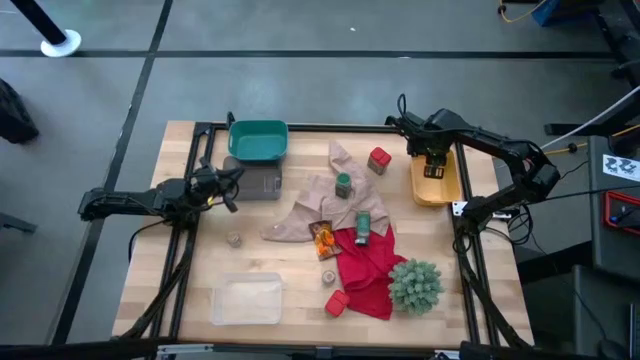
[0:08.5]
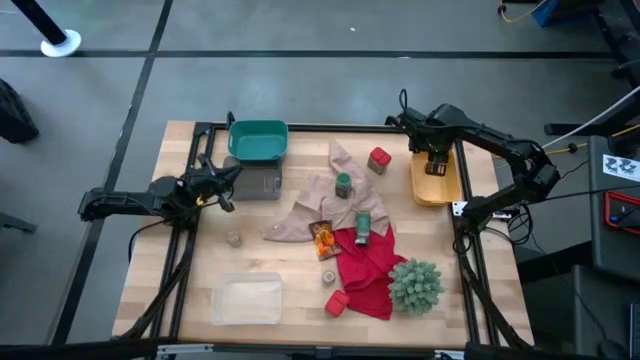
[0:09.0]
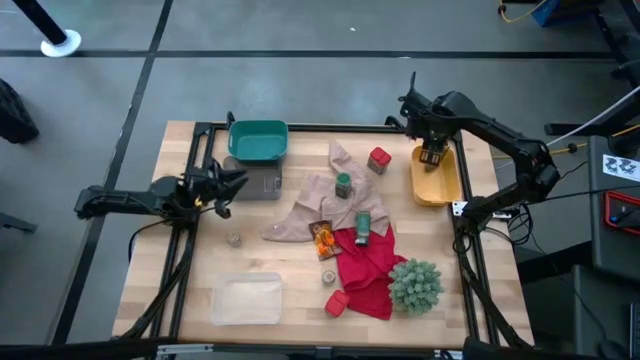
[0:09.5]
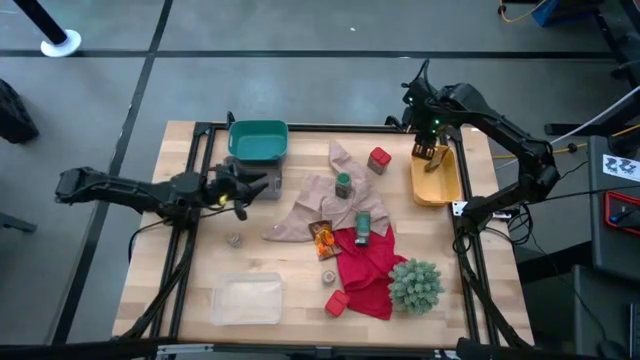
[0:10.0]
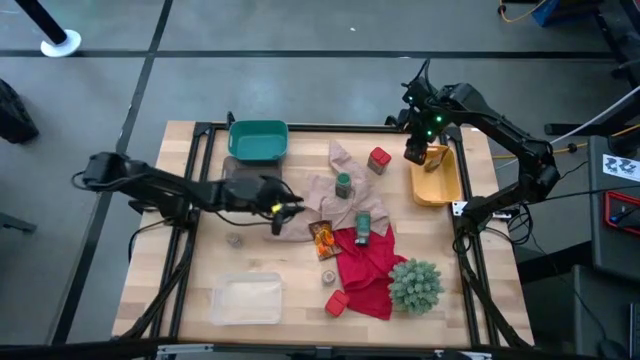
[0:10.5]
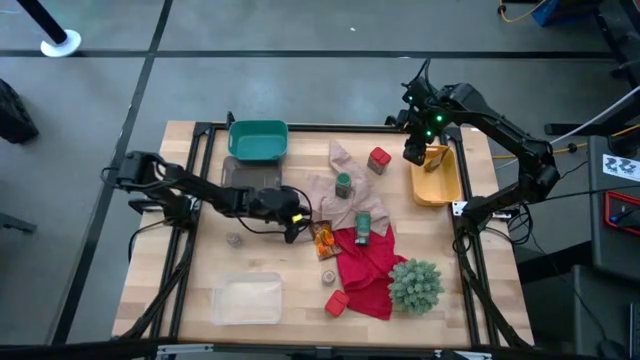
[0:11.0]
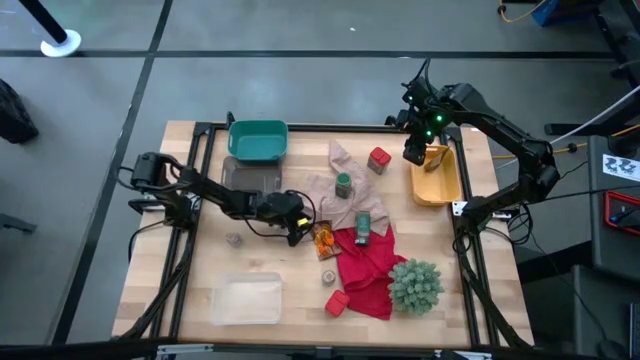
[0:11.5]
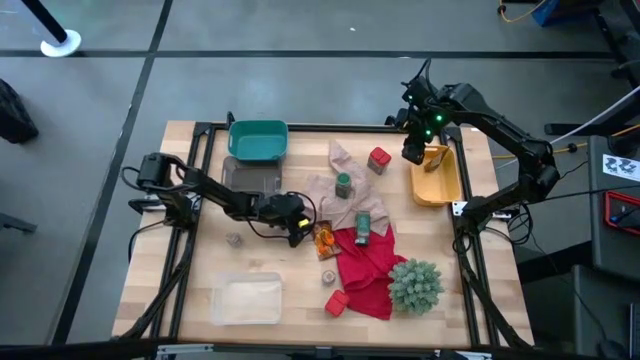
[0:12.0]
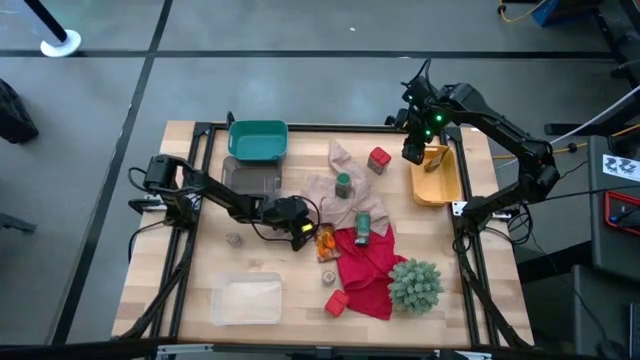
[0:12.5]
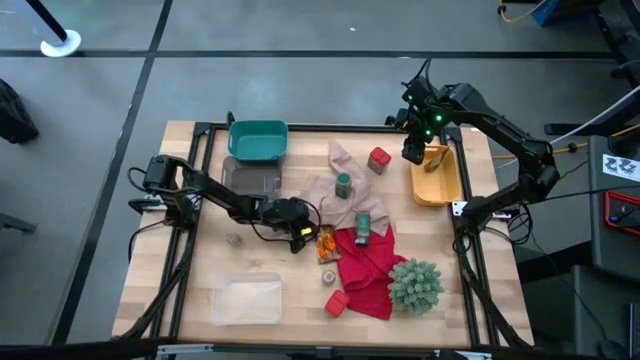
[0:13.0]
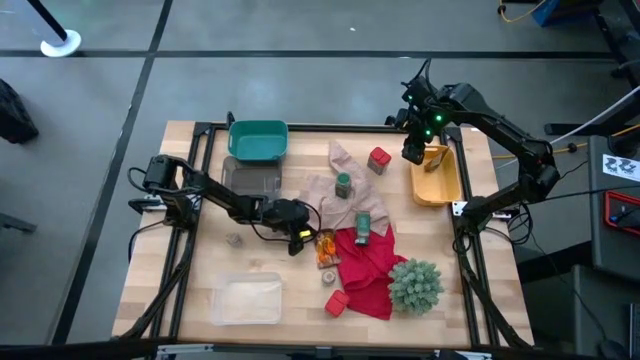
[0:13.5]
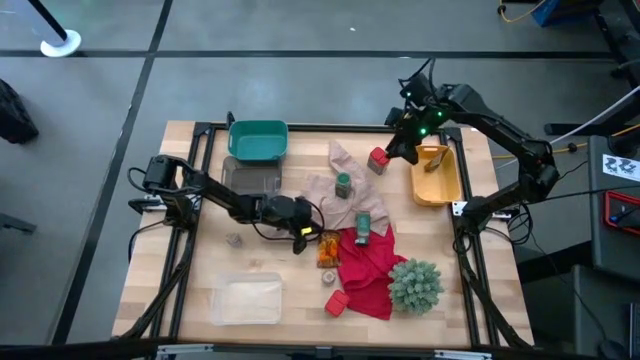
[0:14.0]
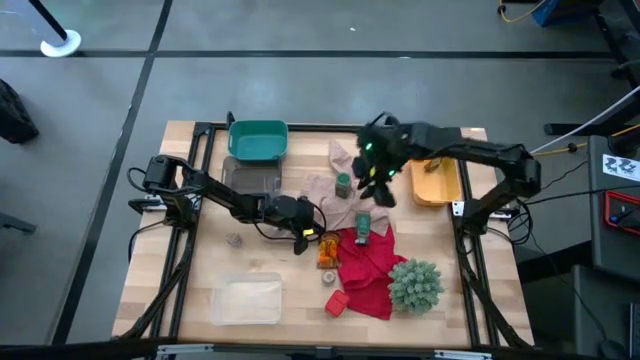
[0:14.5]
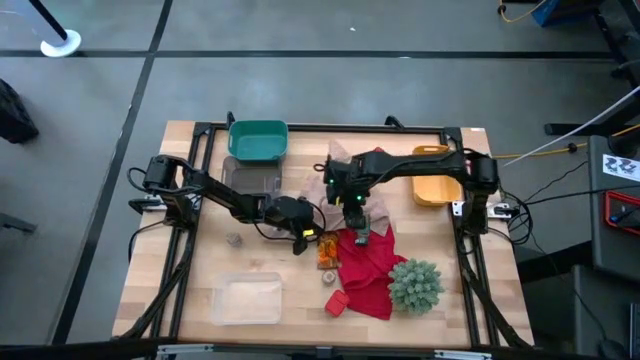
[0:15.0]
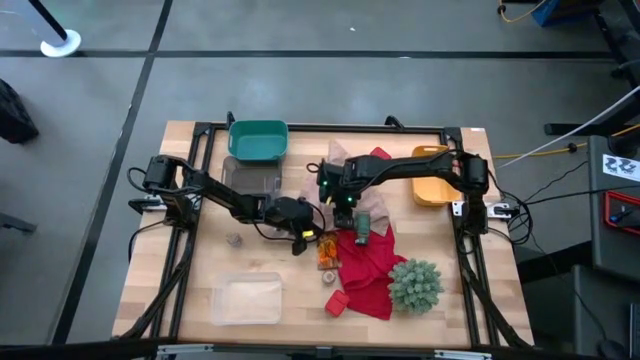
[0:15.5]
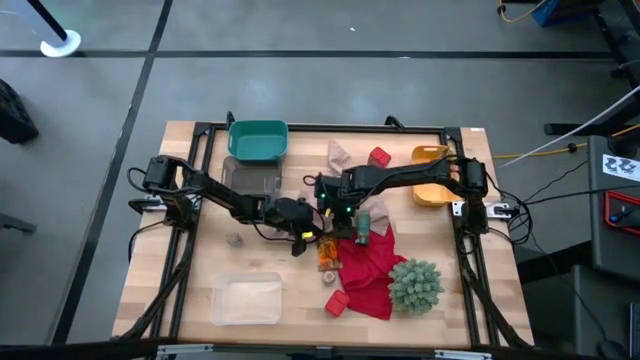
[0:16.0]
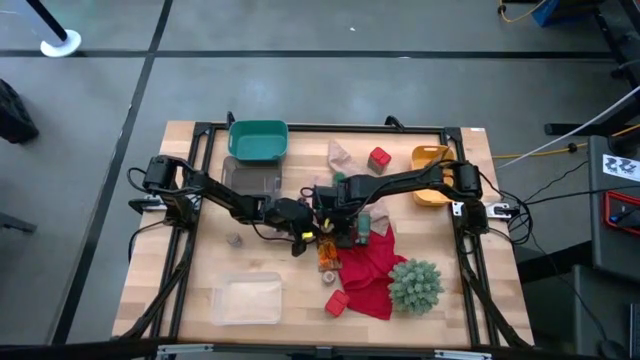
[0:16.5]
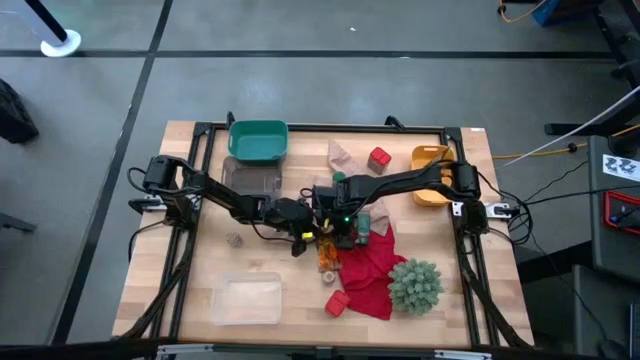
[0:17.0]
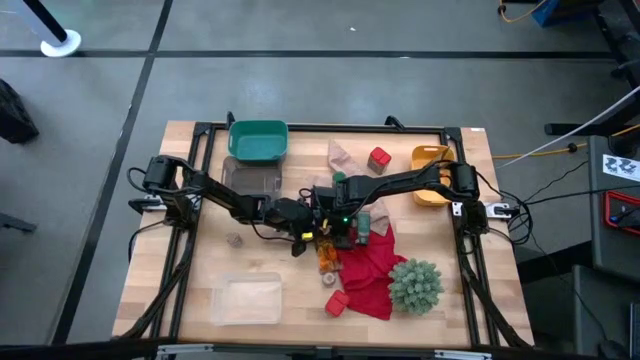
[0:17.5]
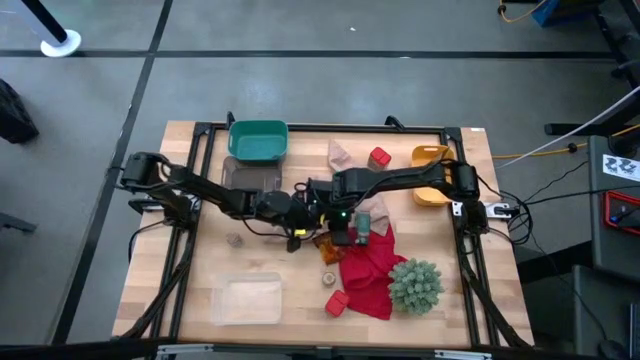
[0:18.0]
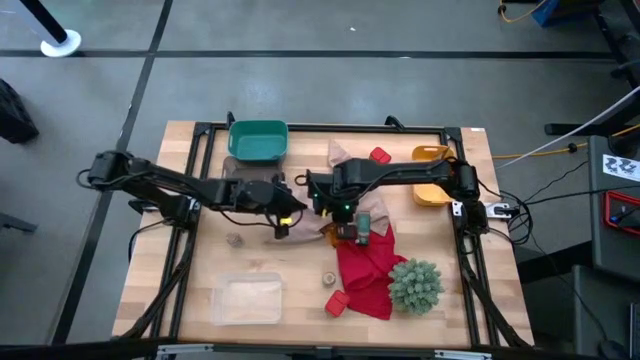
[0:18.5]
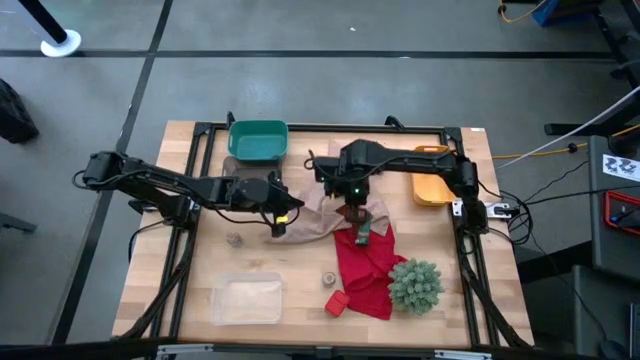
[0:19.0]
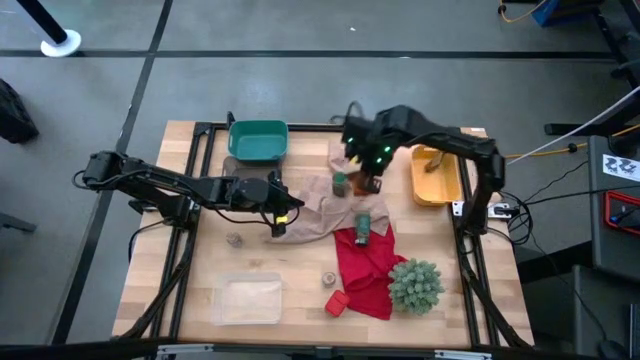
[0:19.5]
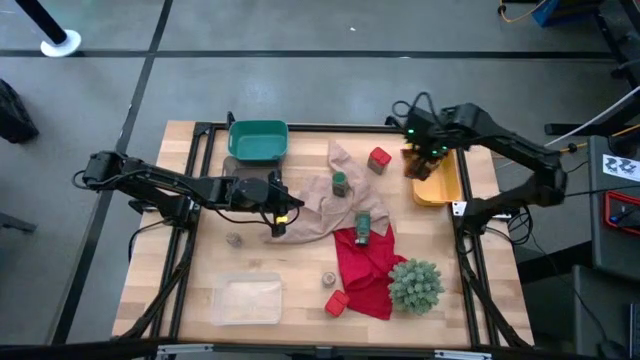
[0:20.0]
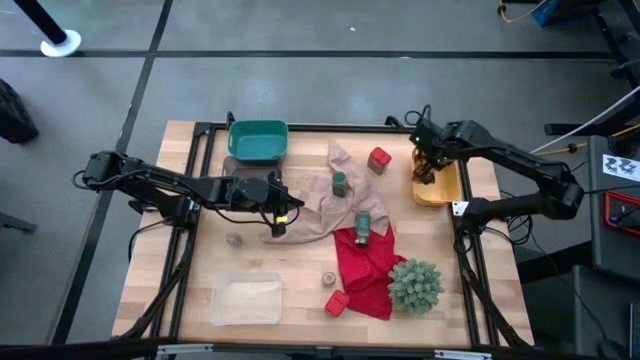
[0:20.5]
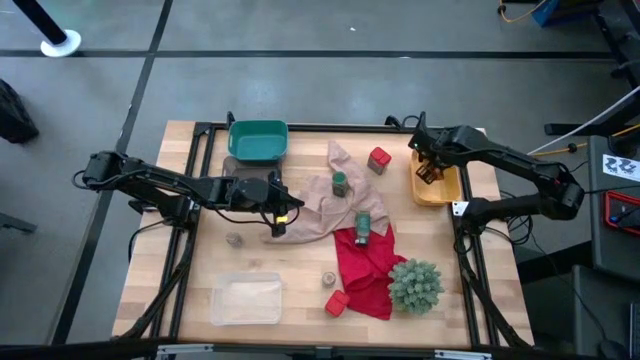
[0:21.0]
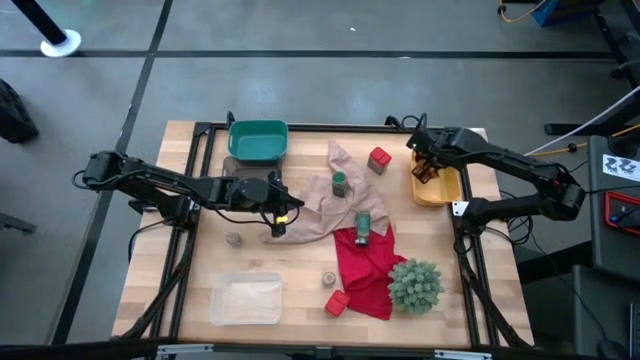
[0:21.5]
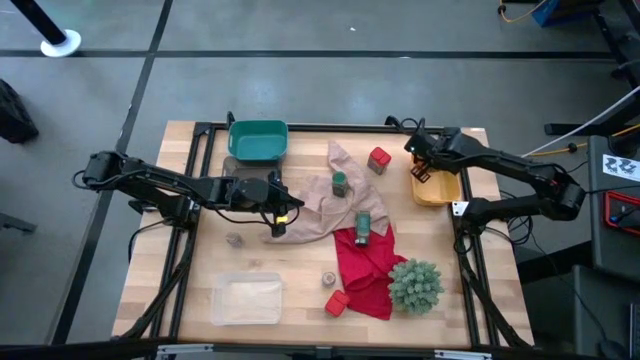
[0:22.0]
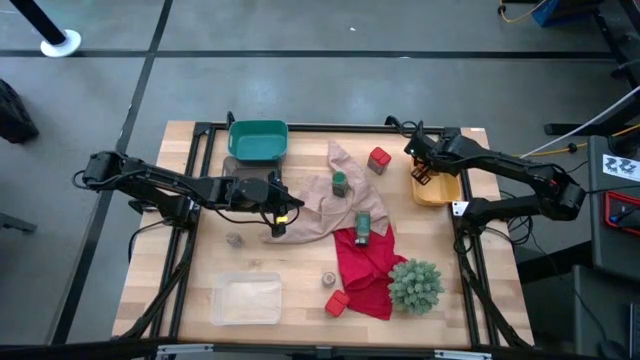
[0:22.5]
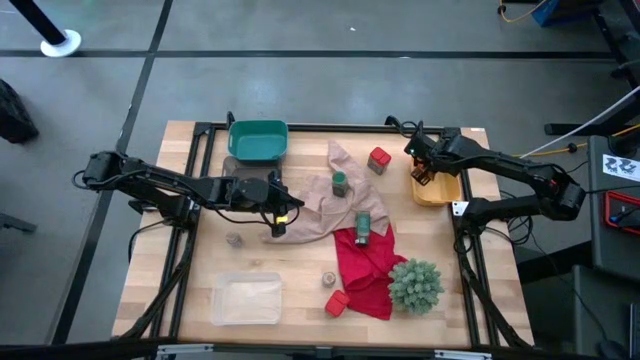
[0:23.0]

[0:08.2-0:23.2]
Task: Sort spices by type
Put the orange seasoning bag into the yellow bin

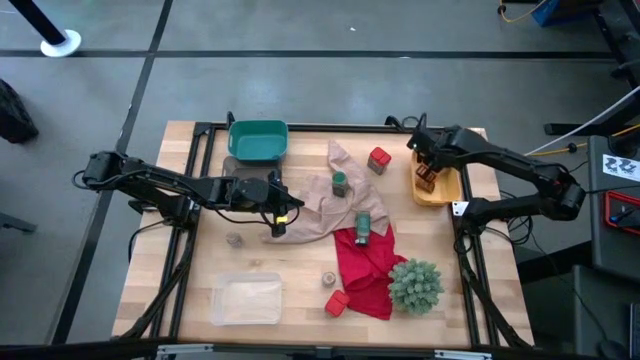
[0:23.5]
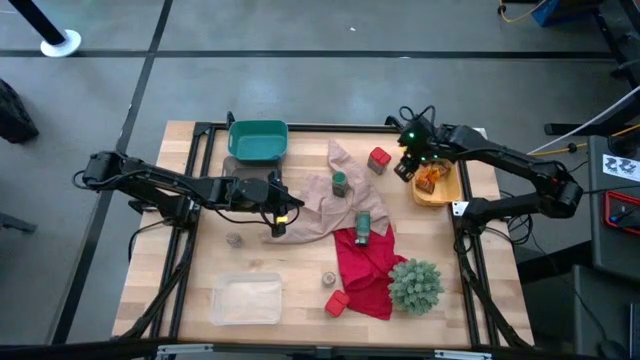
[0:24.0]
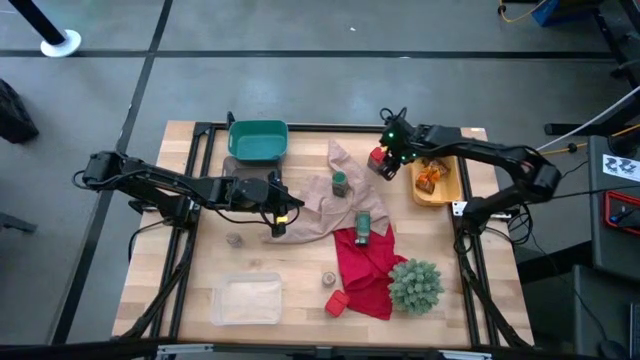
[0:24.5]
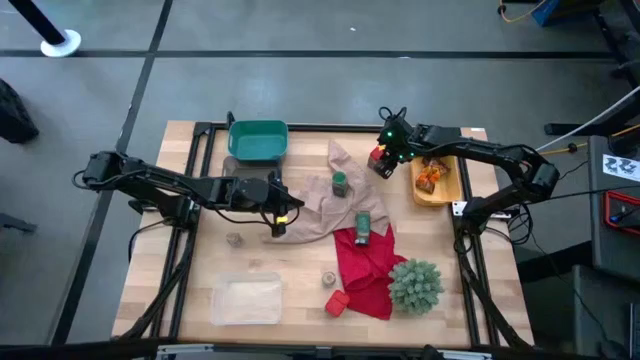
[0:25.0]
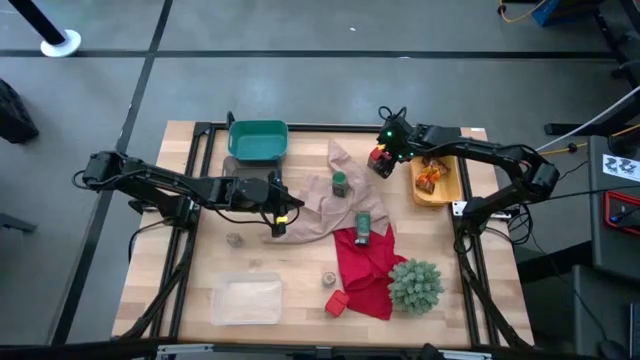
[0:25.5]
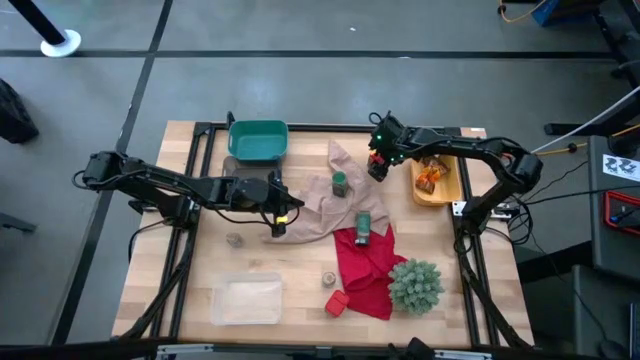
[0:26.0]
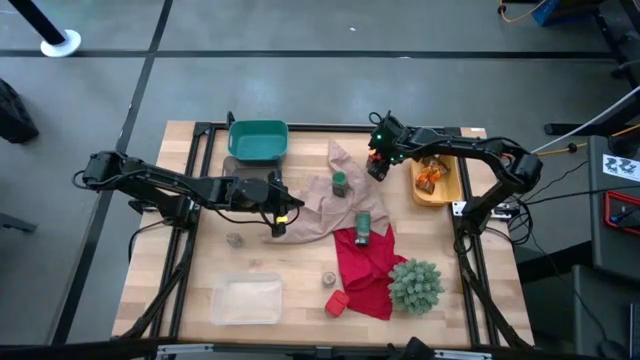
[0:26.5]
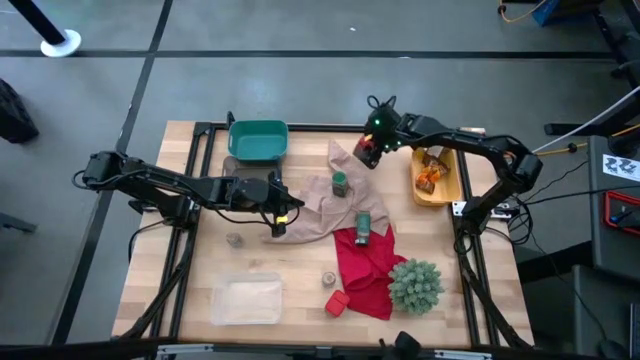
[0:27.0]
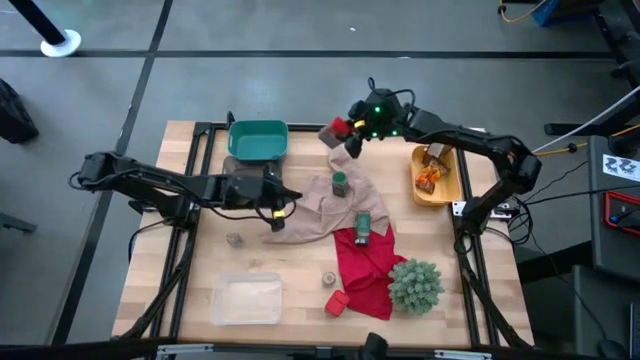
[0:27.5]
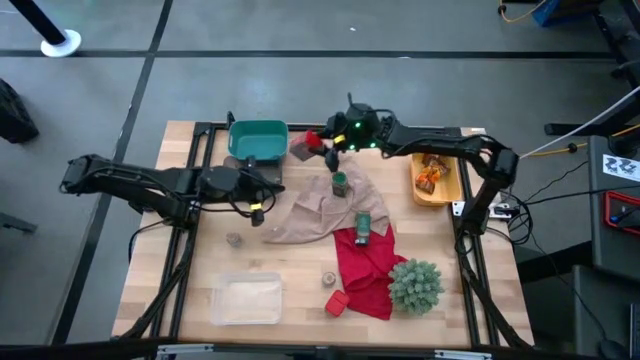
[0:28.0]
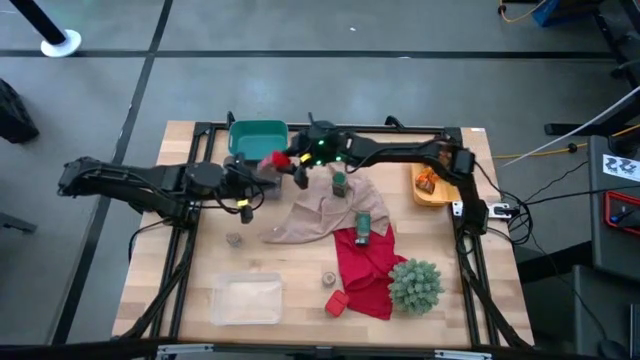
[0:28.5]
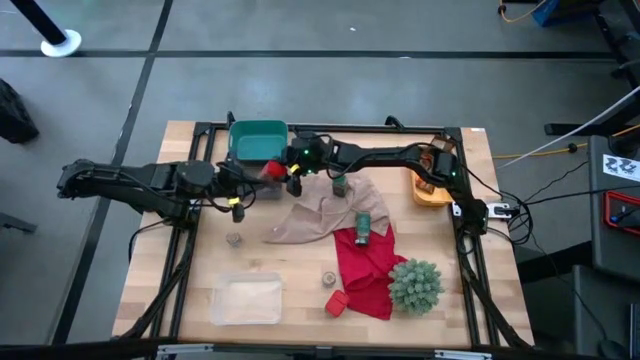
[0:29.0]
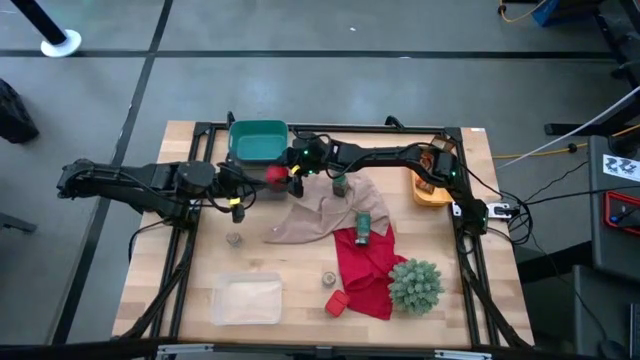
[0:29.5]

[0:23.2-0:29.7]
Put the top red seasoning can into the black transparent bin
